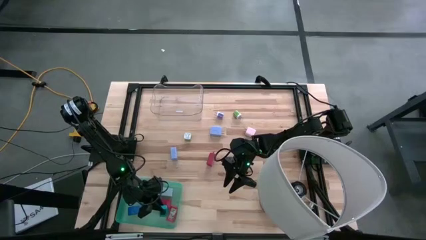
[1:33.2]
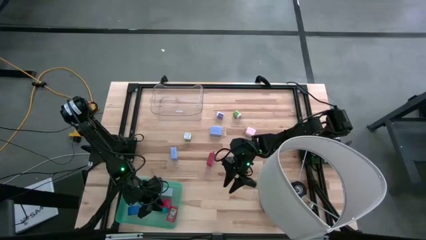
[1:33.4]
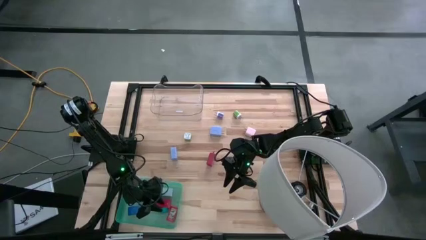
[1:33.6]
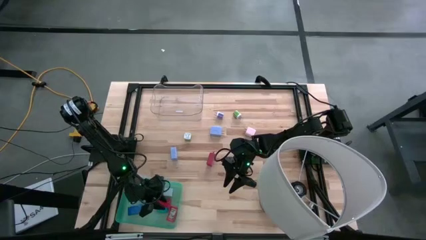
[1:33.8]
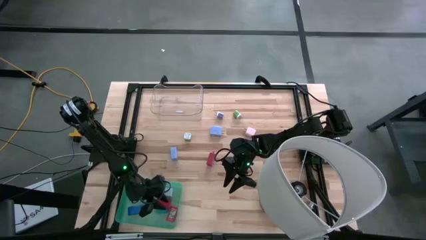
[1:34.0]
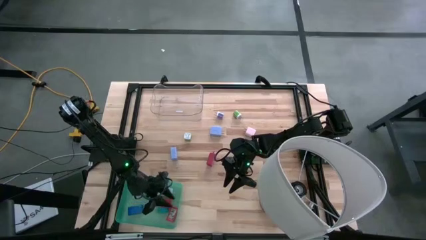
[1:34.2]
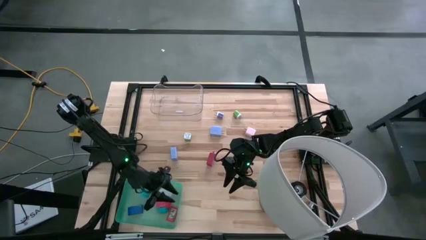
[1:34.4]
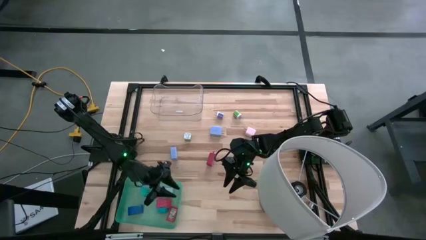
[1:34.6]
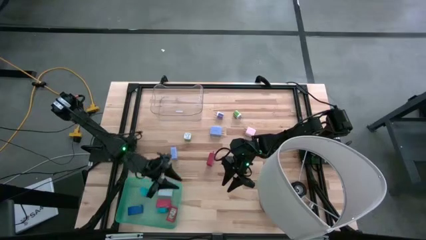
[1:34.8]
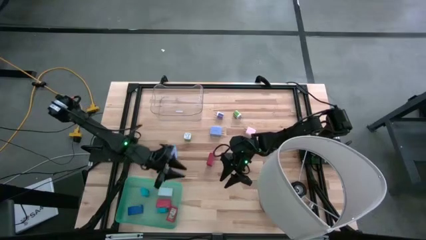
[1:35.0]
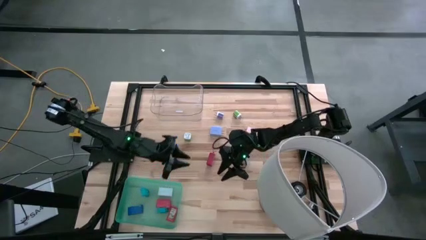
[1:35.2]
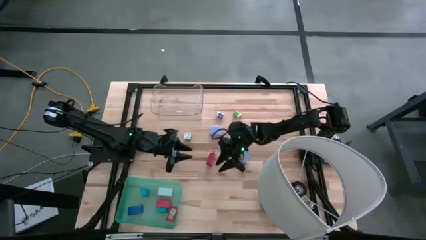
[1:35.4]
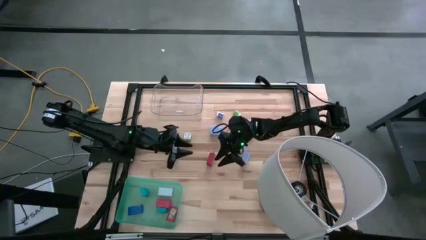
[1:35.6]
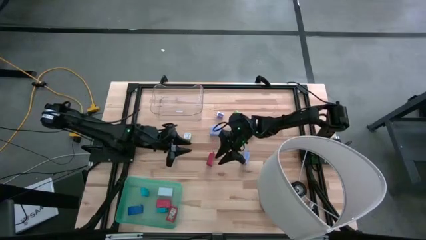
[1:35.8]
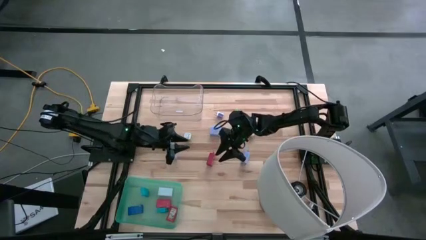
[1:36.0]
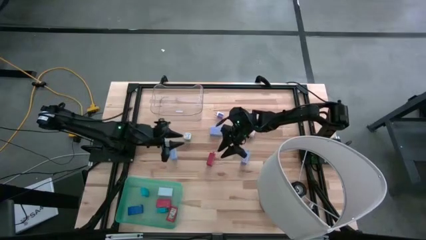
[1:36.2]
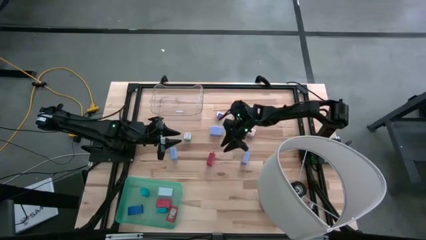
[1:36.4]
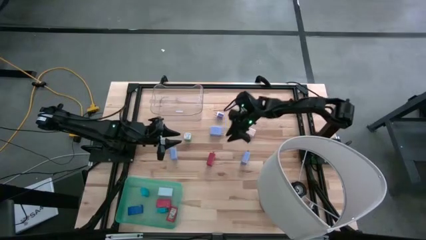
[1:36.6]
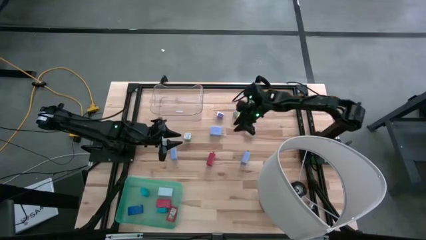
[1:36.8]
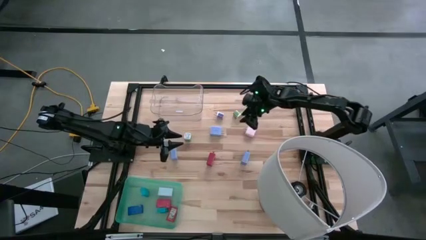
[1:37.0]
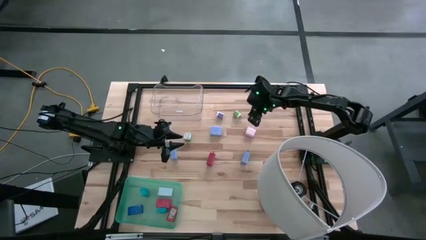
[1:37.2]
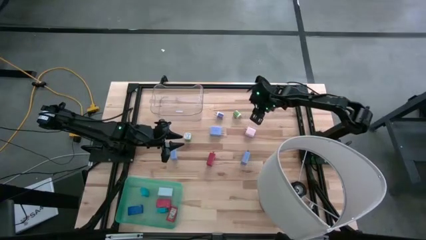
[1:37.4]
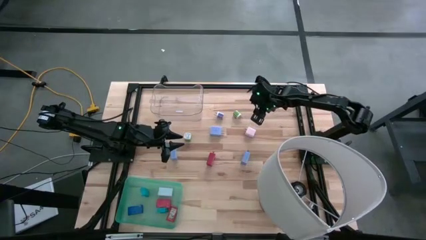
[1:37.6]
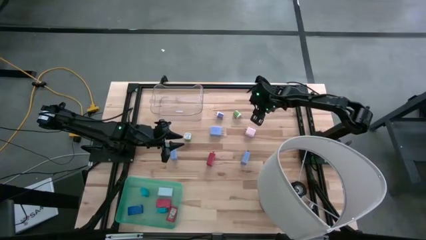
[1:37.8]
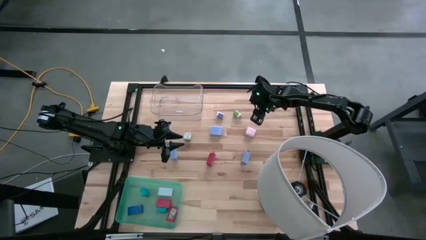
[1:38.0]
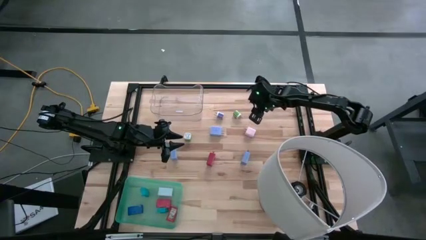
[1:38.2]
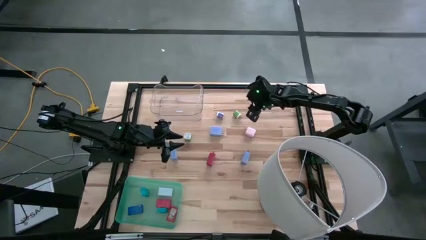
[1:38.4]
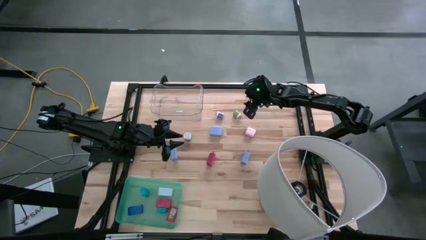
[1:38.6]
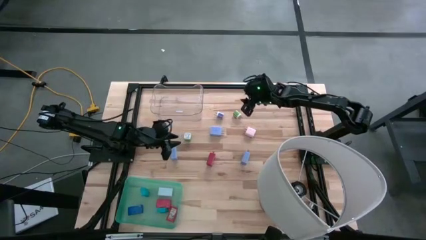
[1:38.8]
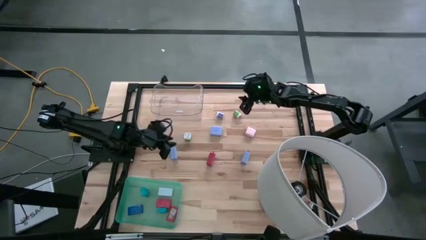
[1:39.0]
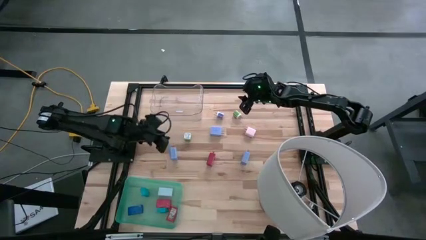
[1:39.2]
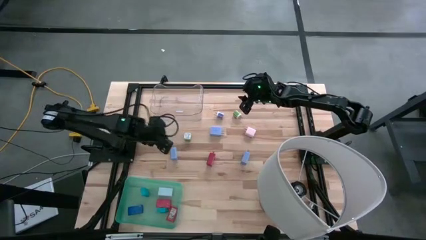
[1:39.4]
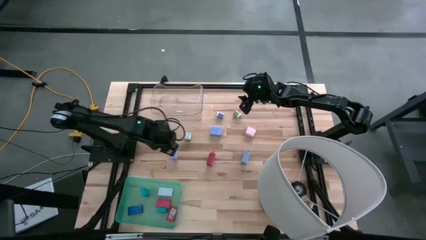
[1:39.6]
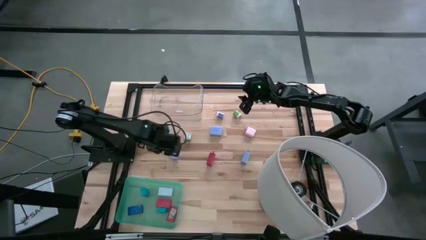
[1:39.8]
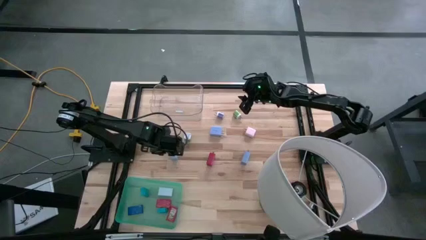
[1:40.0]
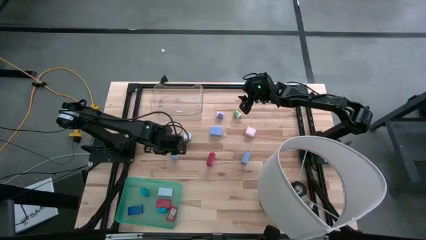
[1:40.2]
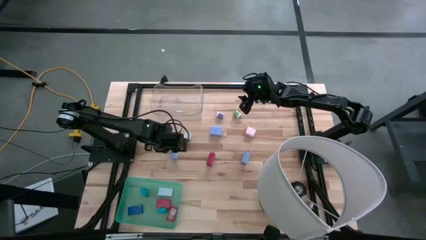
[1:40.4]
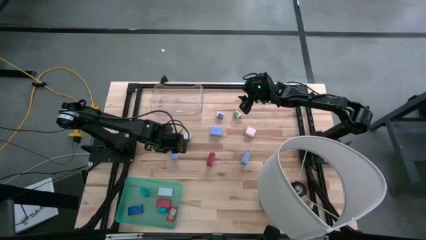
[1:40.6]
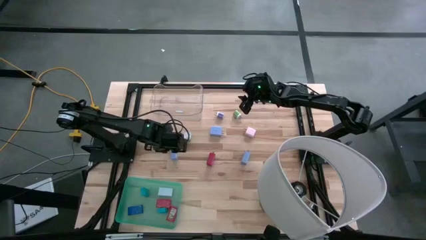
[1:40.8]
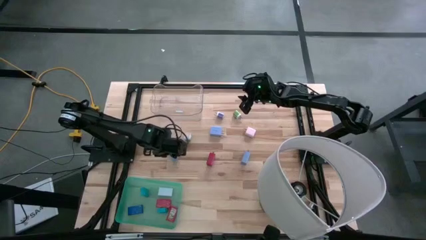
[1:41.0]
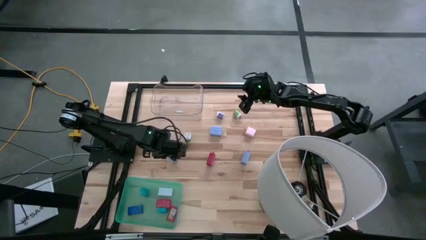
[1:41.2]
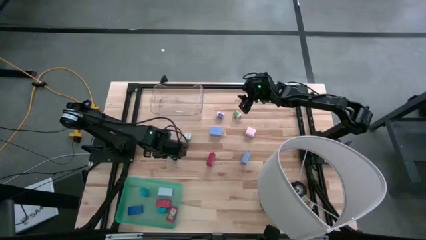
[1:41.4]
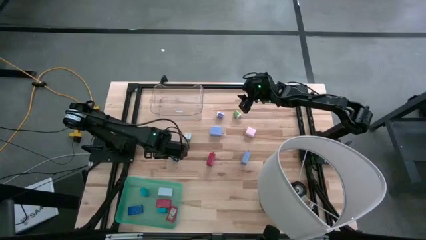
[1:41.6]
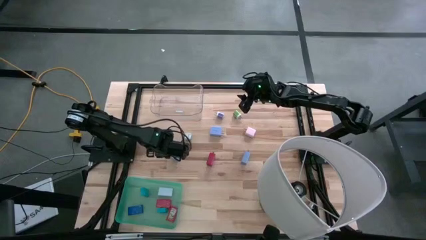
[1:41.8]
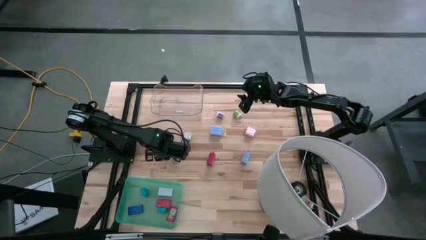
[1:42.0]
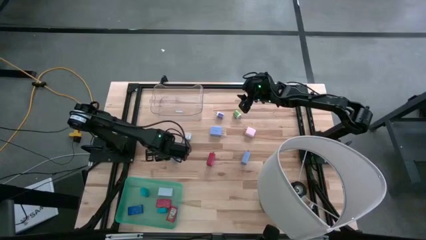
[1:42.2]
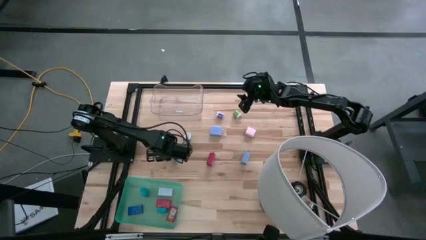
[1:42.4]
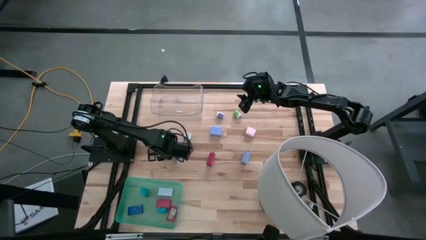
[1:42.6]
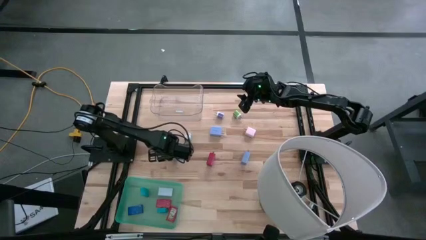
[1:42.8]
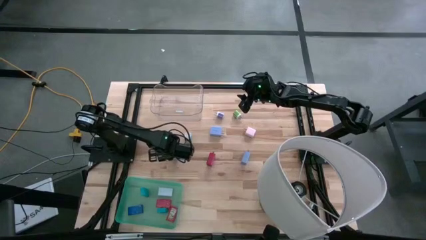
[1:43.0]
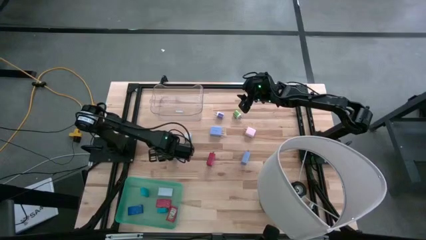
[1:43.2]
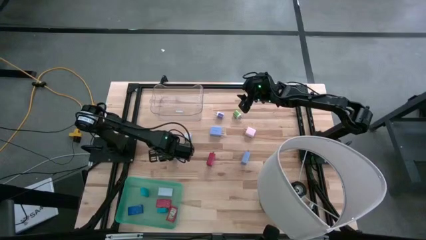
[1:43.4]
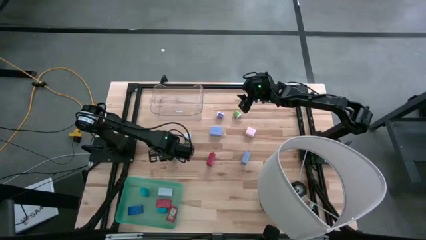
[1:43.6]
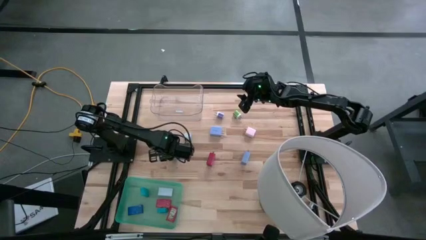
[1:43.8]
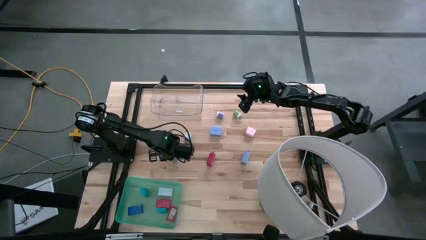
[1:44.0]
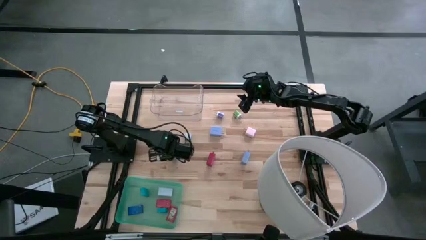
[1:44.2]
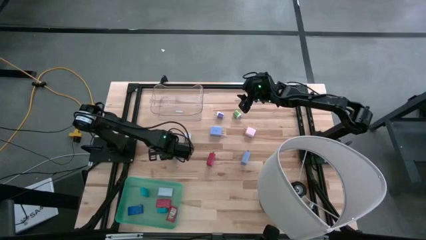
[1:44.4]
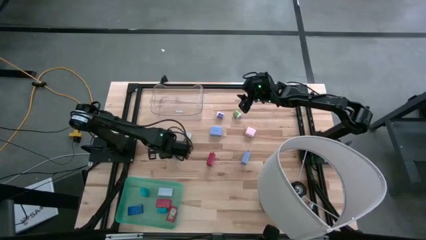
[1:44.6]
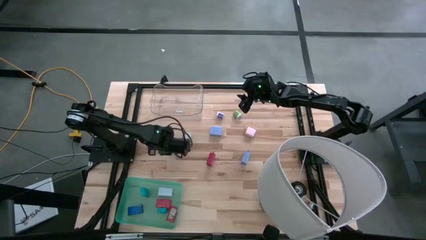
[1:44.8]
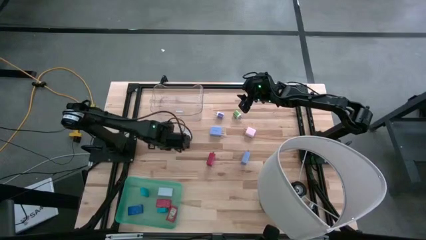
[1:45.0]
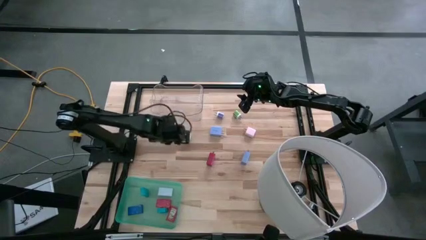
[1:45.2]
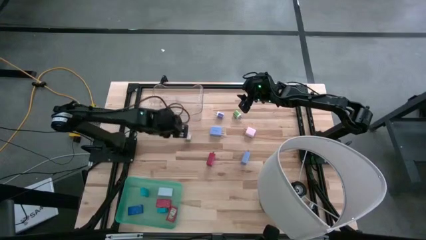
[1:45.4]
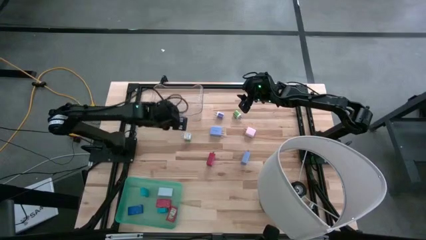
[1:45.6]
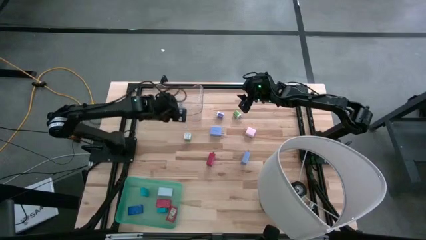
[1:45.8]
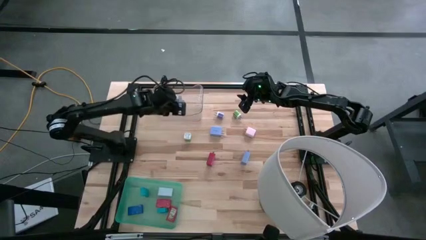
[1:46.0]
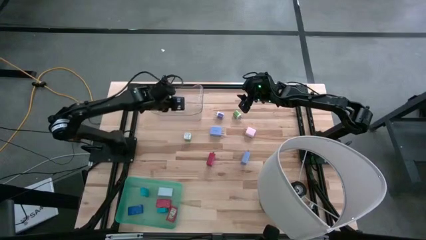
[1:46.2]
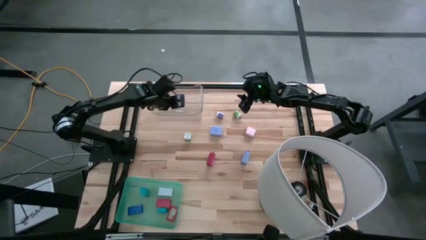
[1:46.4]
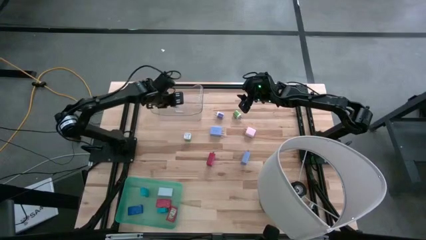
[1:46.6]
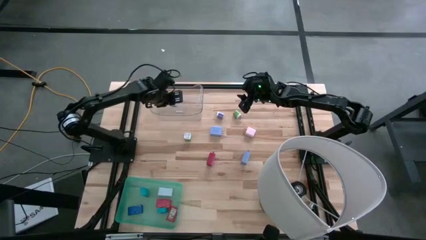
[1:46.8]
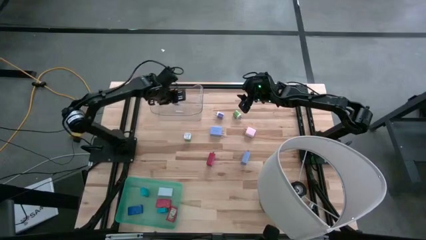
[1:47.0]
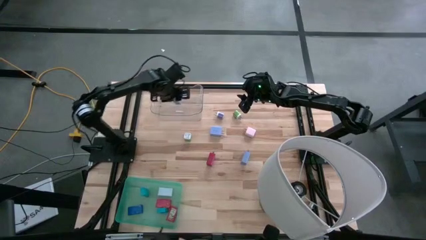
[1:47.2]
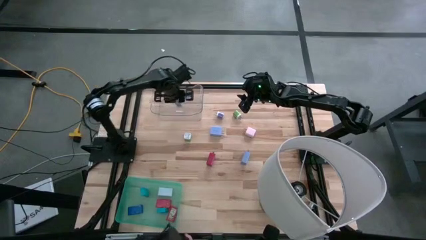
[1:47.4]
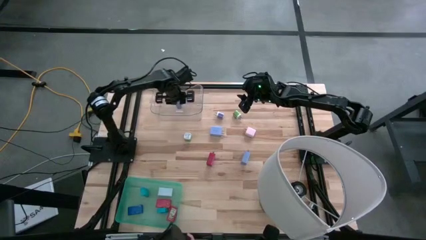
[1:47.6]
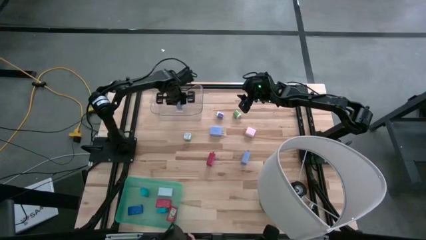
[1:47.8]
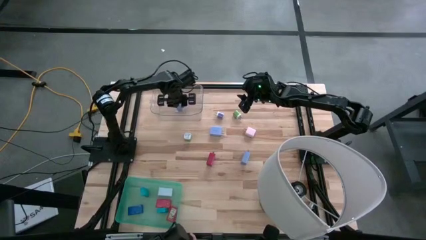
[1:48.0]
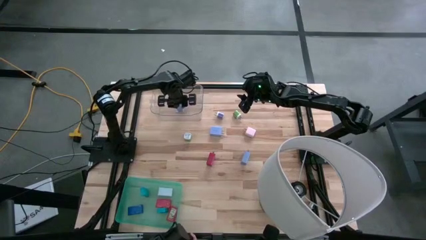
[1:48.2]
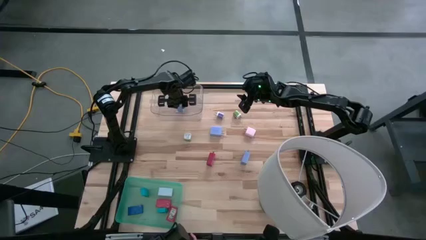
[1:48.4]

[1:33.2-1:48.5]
Task: Pick & Place Office items
Put the left blue charger adapter into the transparent bin
